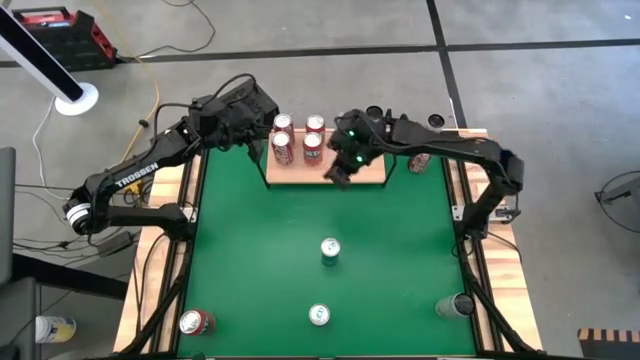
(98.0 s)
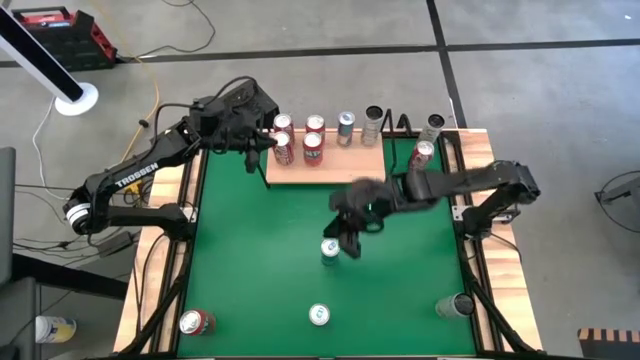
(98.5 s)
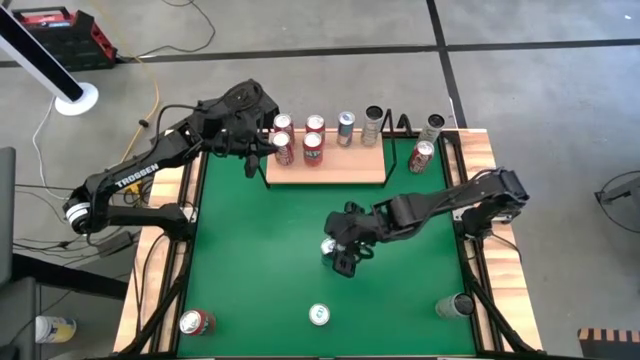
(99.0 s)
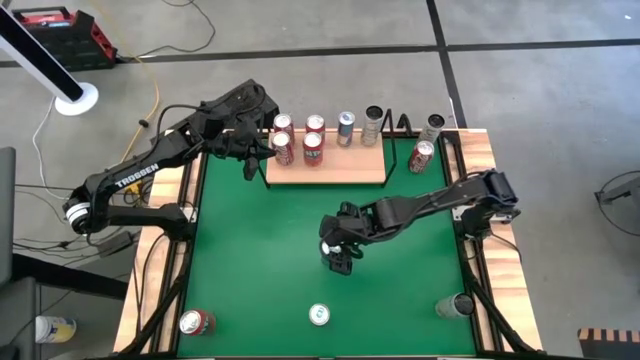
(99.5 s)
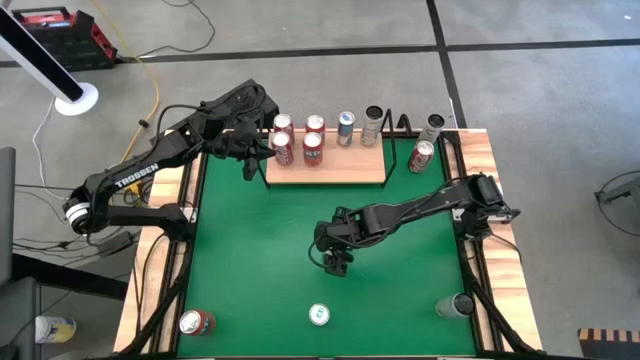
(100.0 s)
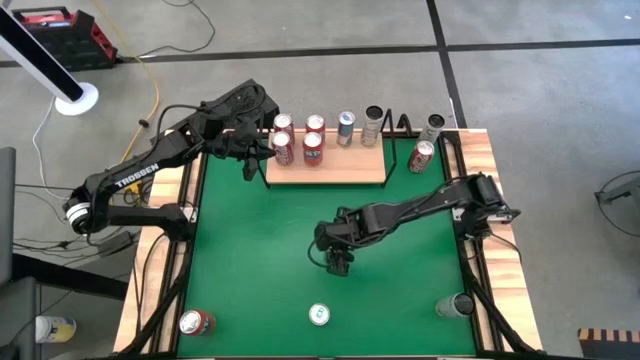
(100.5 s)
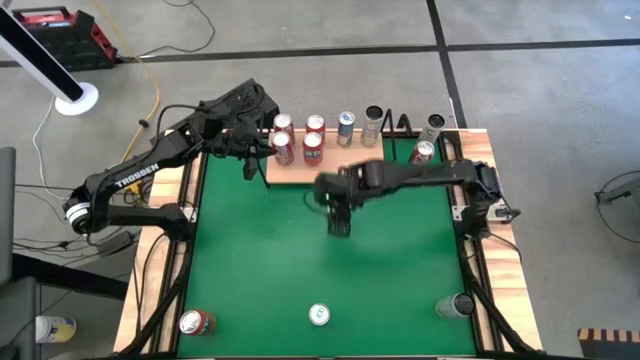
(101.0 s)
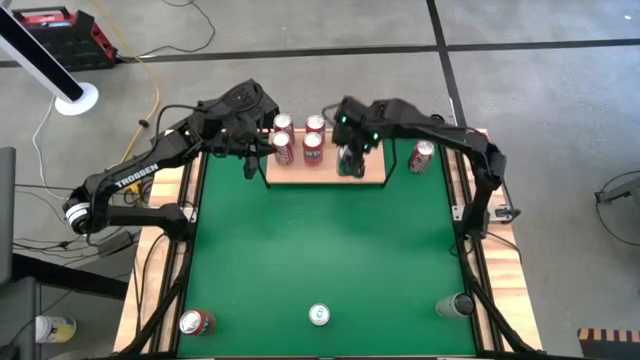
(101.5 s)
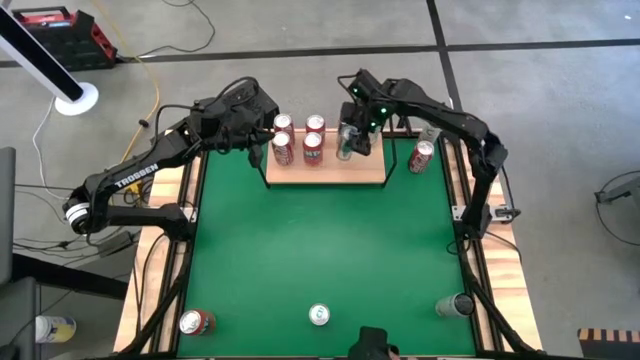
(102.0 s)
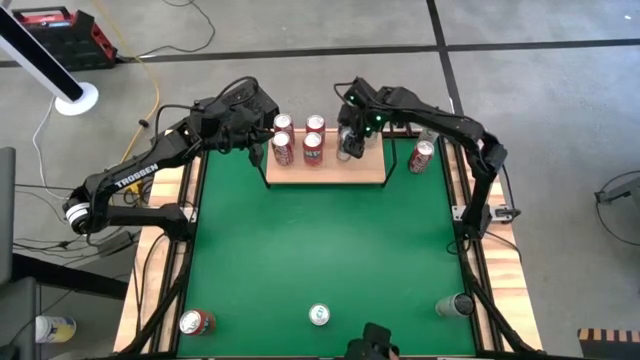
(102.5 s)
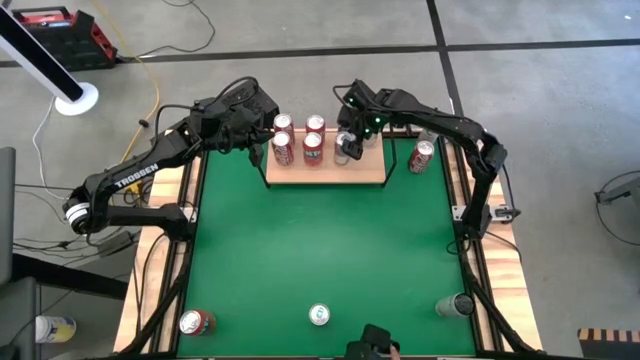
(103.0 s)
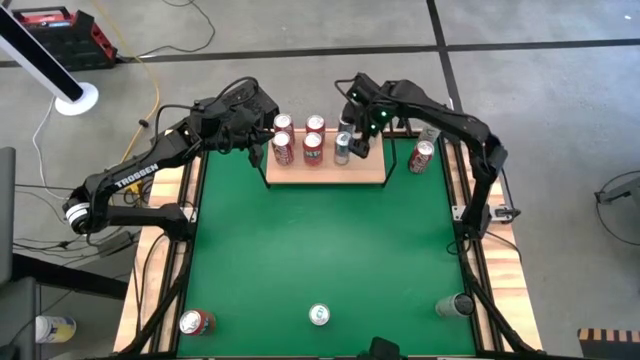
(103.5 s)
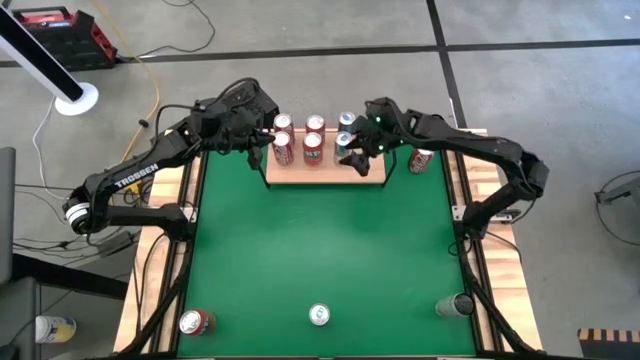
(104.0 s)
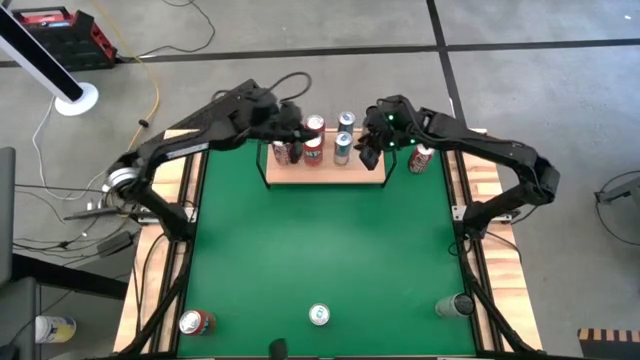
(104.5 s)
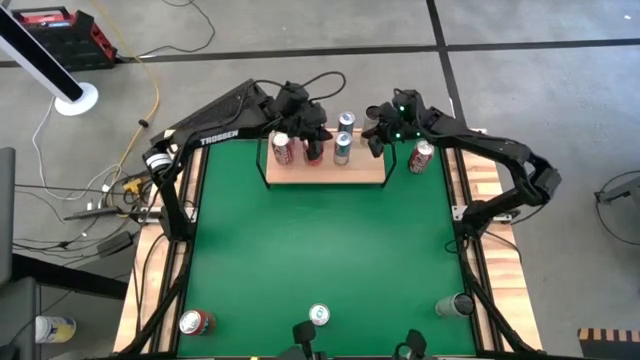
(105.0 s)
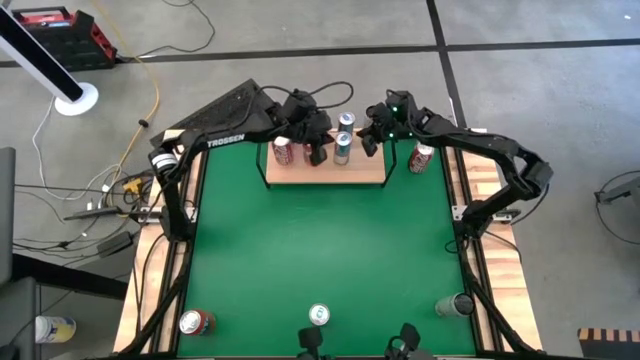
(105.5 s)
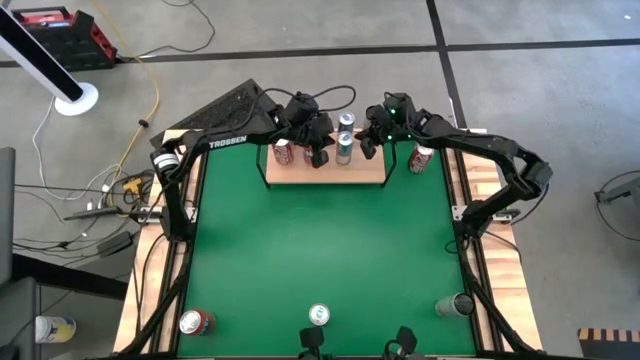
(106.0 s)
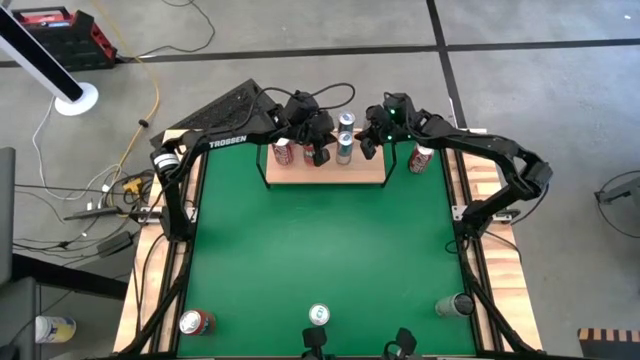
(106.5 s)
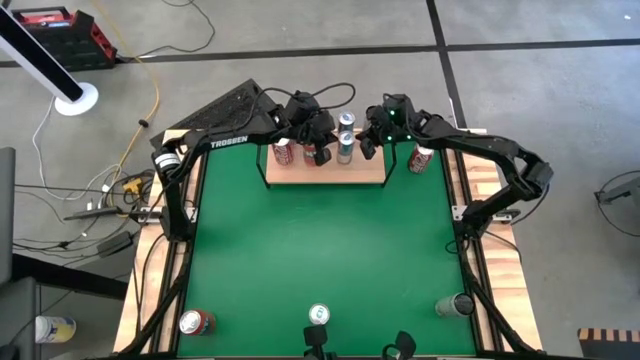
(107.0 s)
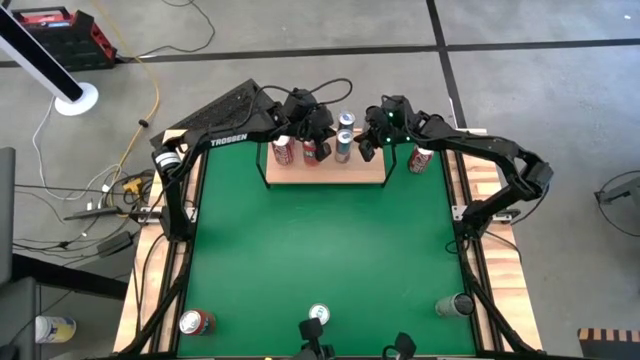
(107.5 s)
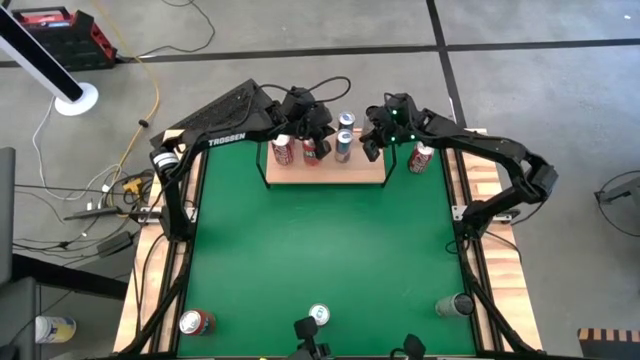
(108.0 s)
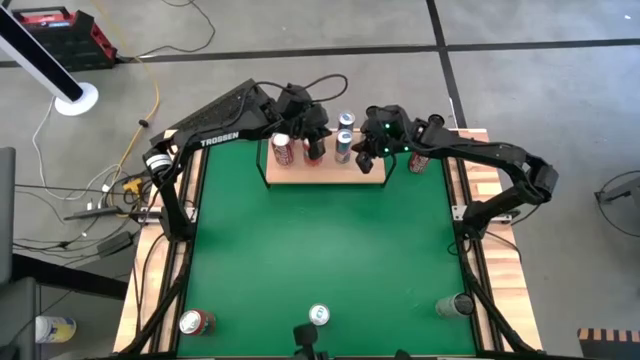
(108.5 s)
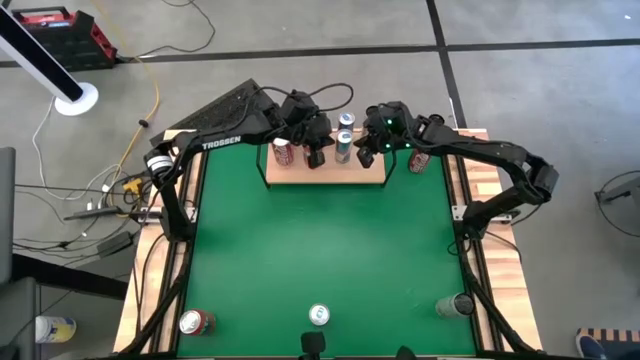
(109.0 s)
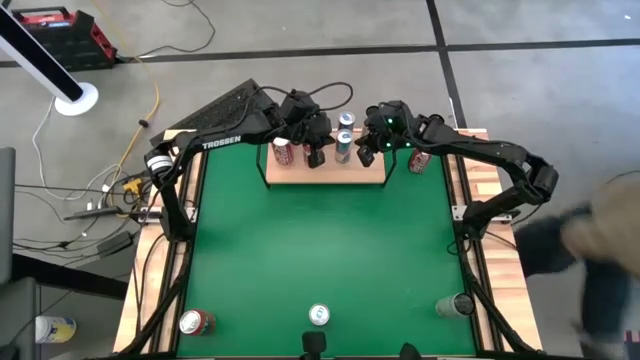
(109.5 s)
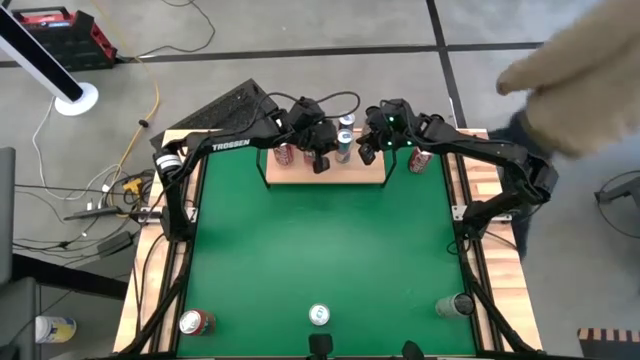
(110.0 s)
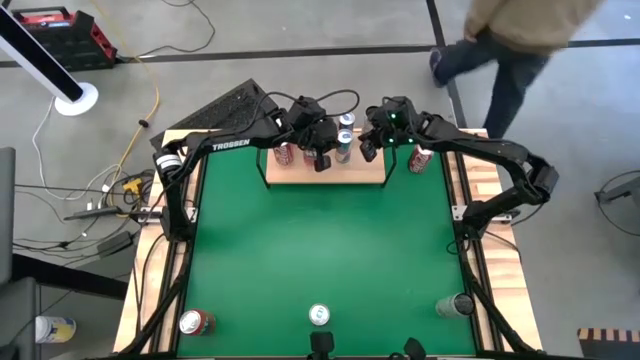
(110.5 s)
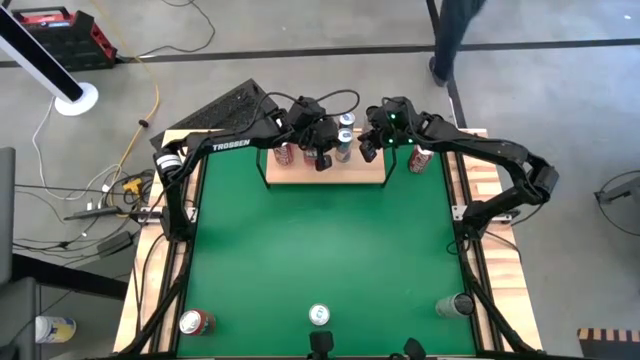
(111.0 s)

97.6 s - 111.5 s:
Task: Place canned beverage on shelf
Put the top blue soda can on the shelf

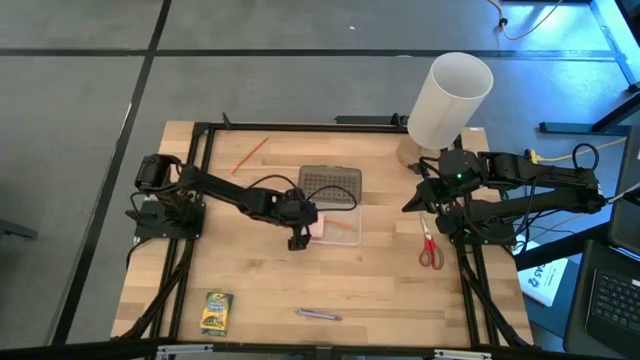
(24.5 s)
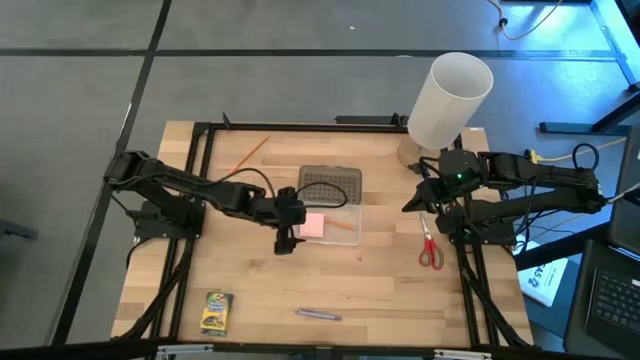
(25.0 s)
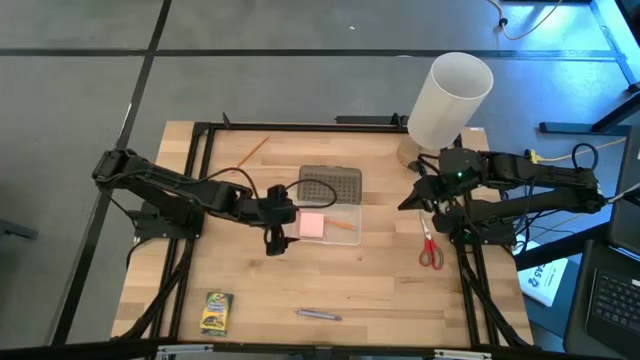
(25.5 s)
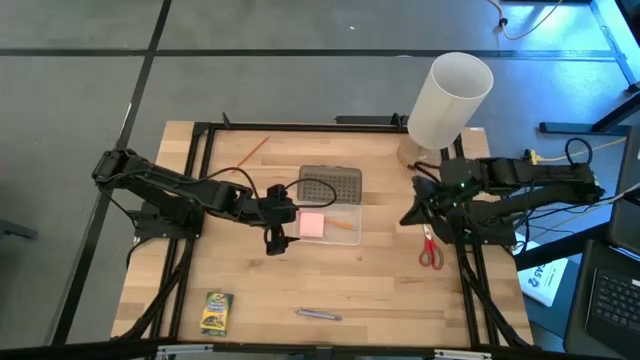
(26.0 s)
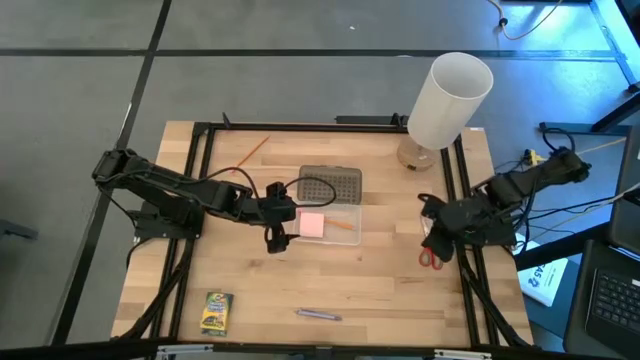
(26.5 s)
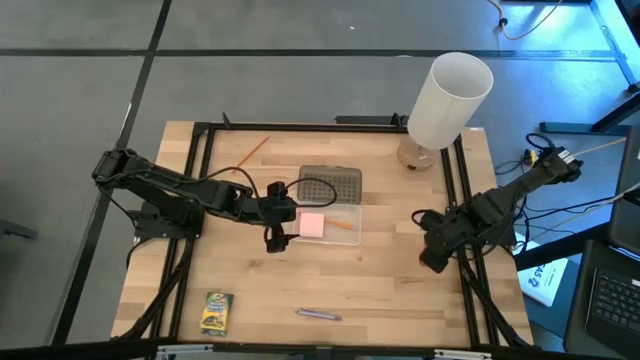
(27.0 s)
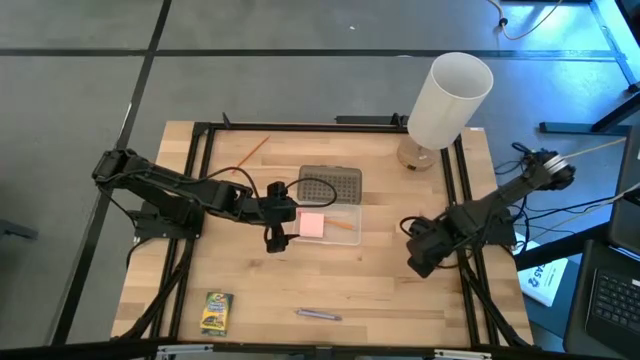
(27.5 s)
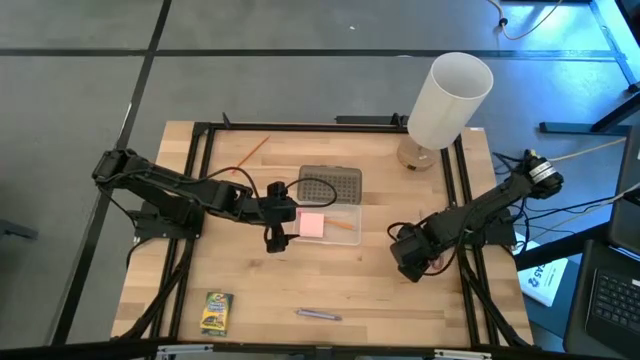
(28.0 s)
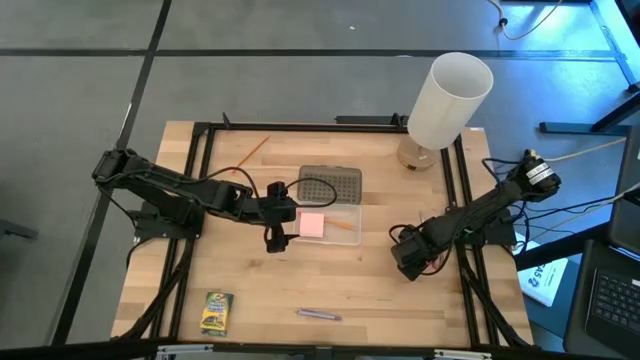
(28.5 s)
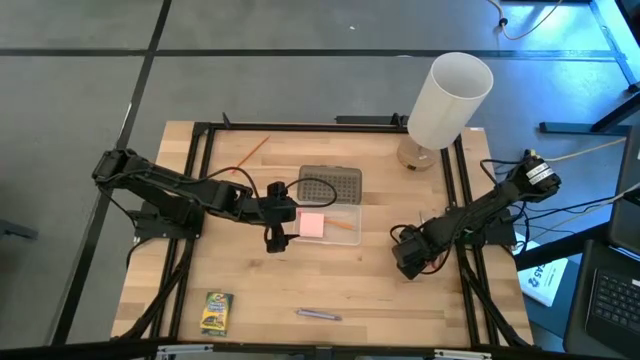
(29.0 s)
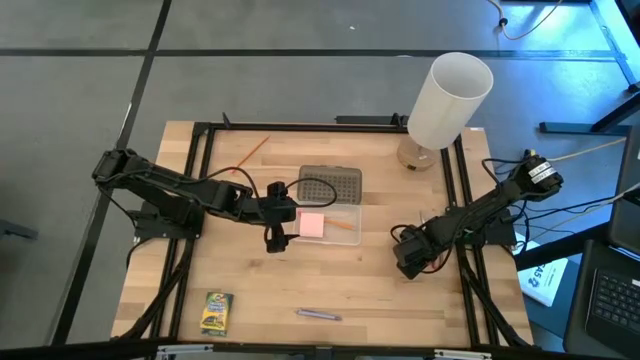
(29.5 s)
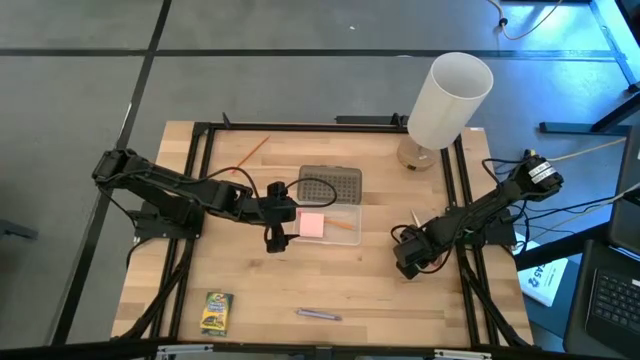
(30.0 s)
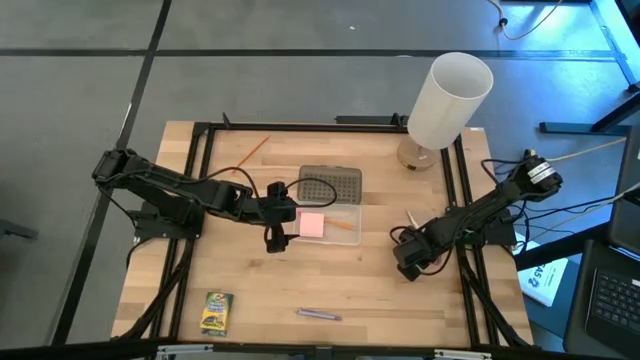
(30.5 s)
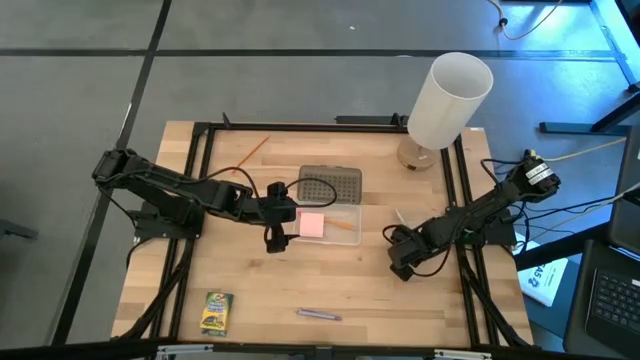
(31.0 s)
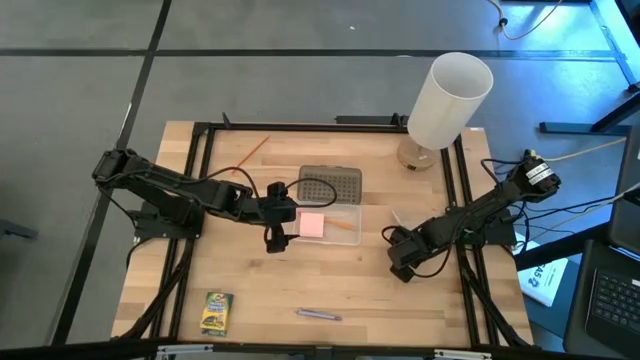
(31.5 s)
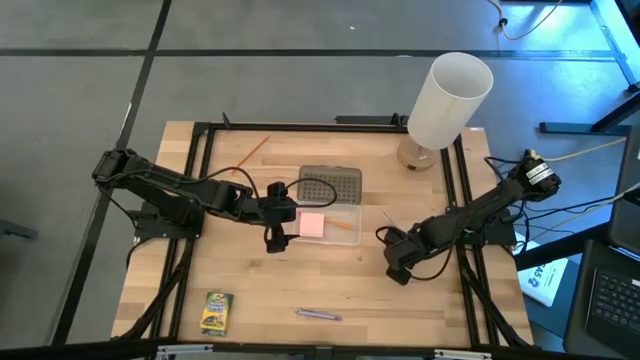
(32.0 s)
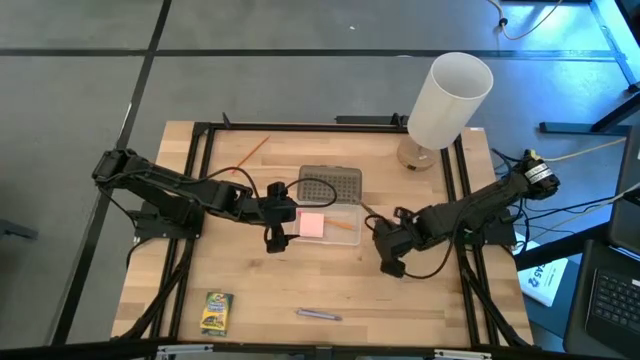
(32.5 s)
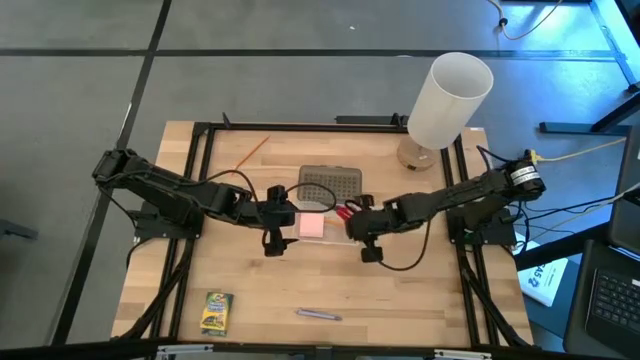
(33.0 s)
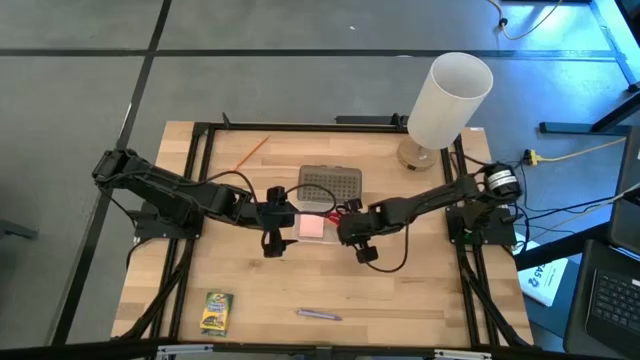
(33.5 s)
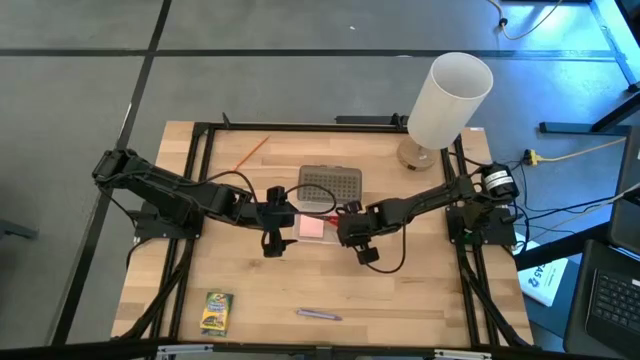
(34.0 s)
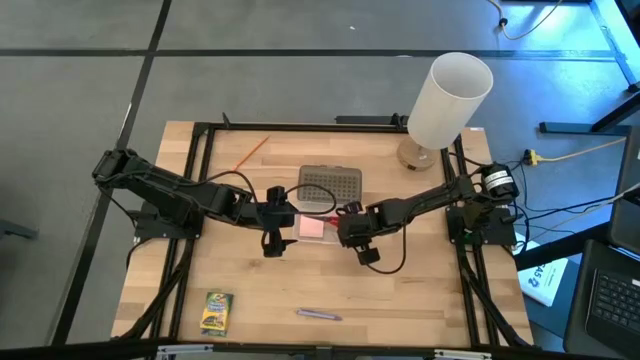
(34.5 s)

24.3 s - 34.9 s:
Task: Pack school essentials
Put the red scissors into the supply box
